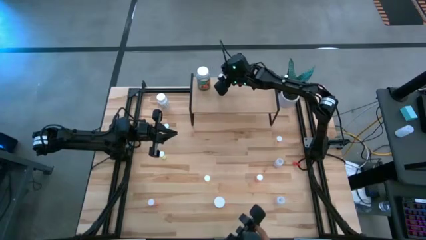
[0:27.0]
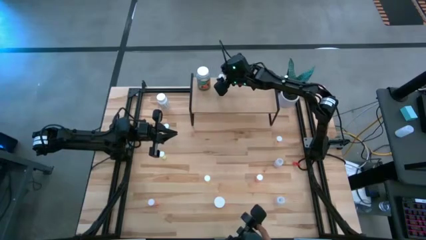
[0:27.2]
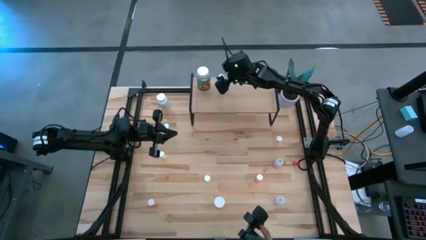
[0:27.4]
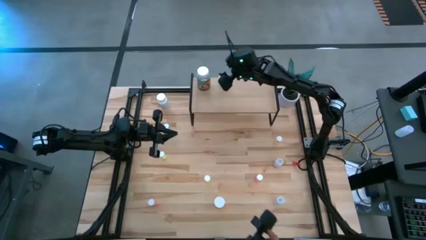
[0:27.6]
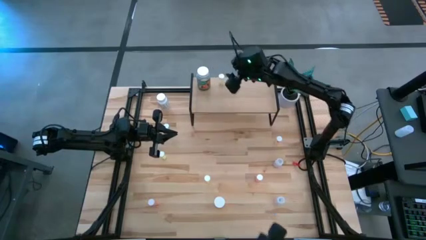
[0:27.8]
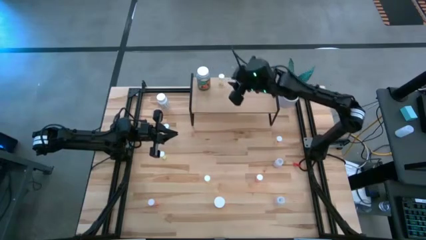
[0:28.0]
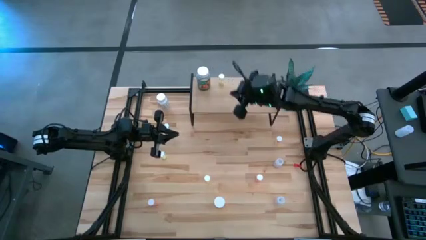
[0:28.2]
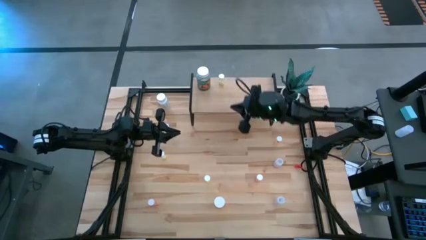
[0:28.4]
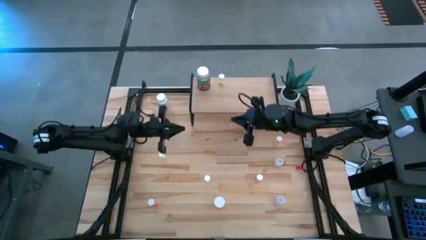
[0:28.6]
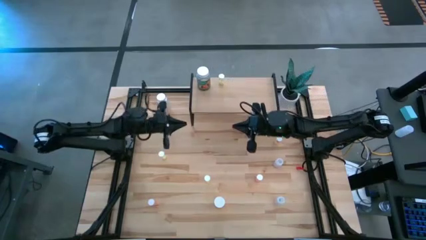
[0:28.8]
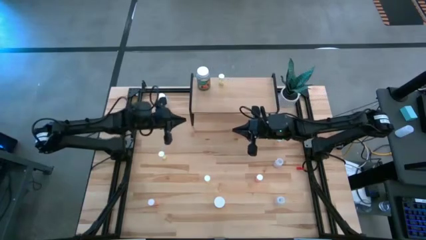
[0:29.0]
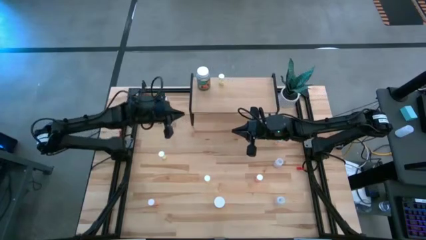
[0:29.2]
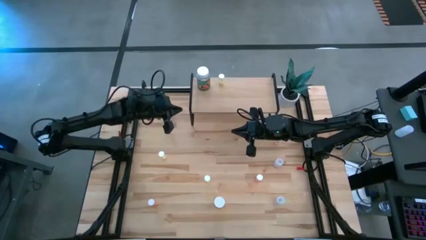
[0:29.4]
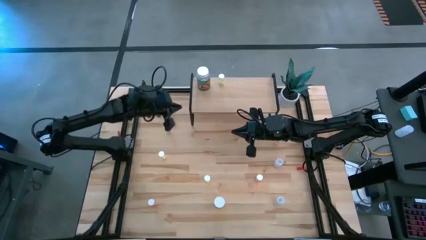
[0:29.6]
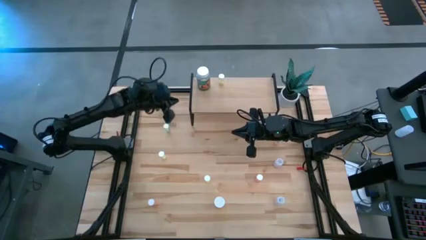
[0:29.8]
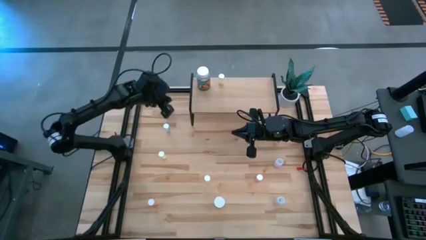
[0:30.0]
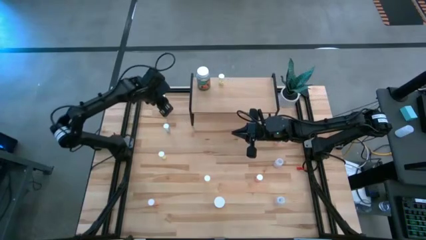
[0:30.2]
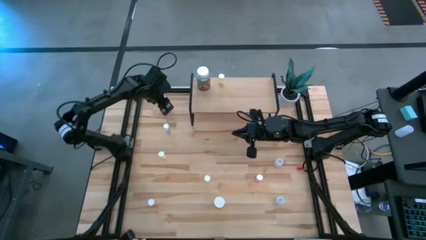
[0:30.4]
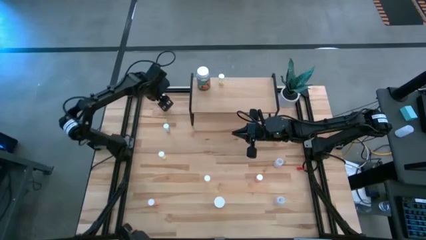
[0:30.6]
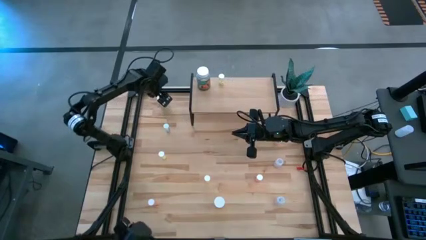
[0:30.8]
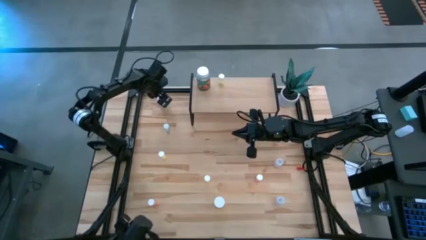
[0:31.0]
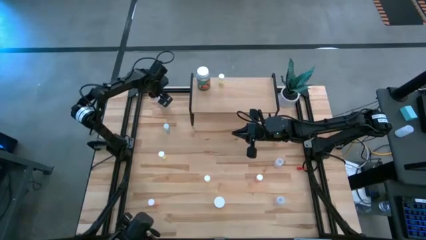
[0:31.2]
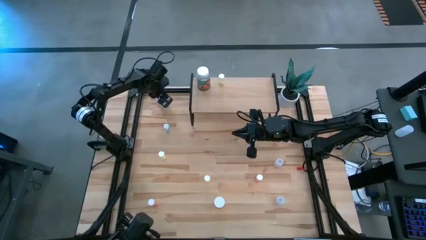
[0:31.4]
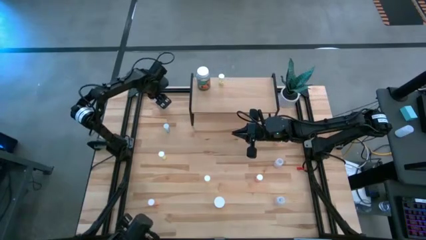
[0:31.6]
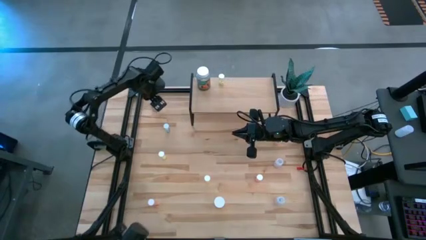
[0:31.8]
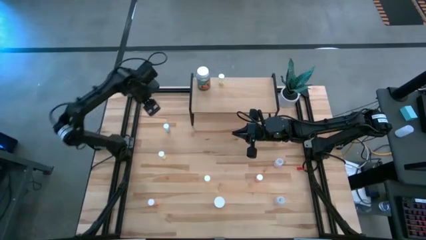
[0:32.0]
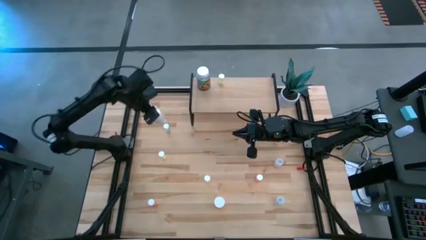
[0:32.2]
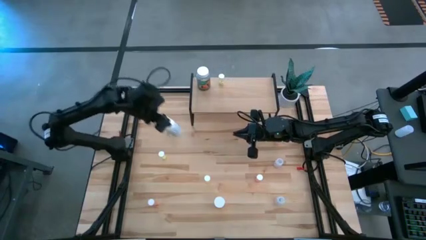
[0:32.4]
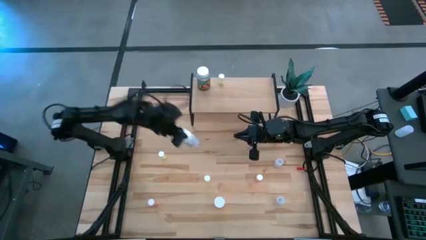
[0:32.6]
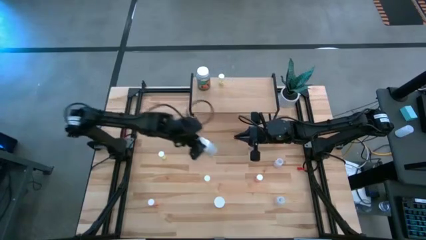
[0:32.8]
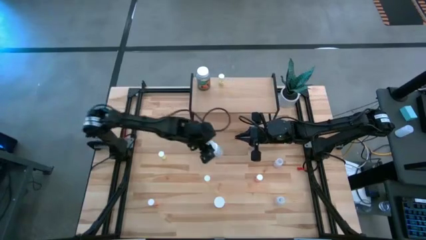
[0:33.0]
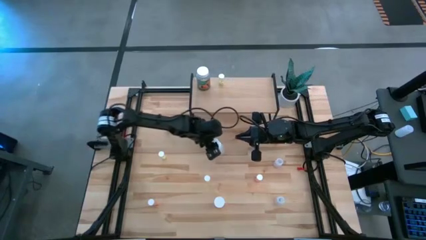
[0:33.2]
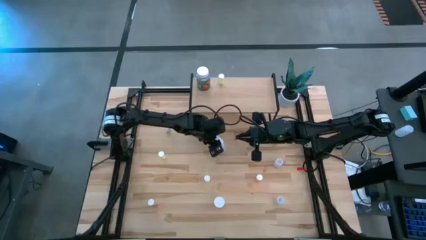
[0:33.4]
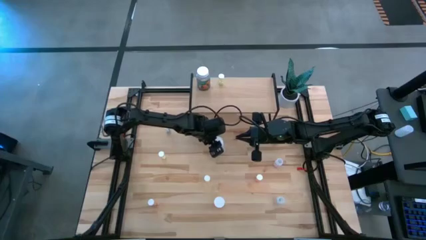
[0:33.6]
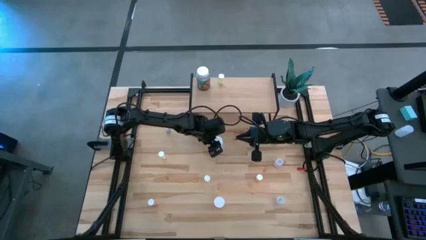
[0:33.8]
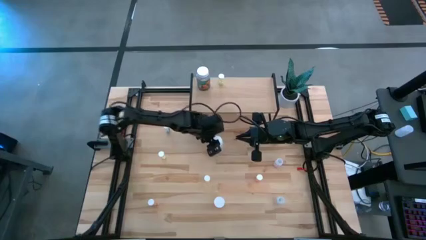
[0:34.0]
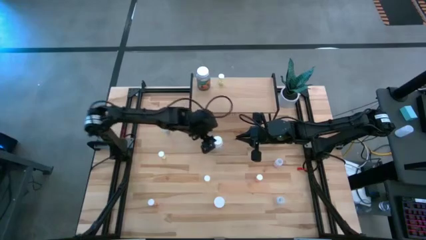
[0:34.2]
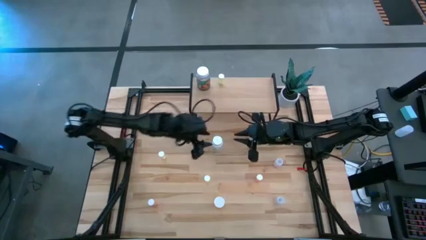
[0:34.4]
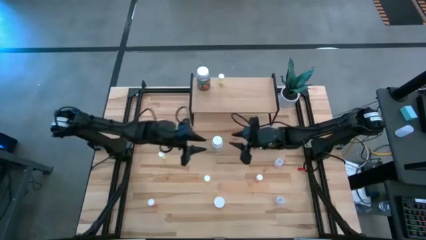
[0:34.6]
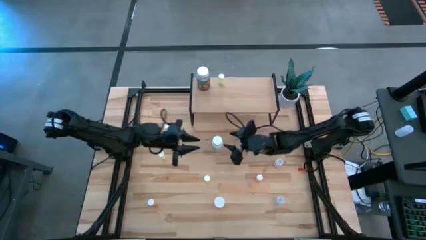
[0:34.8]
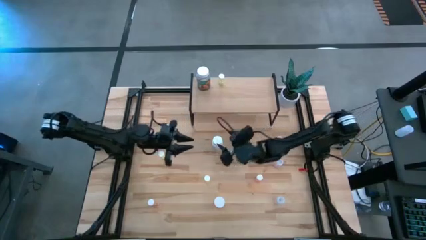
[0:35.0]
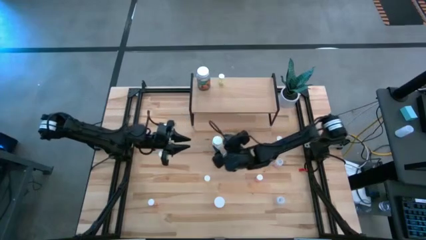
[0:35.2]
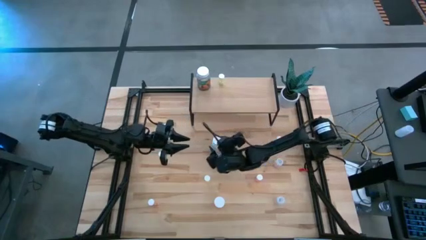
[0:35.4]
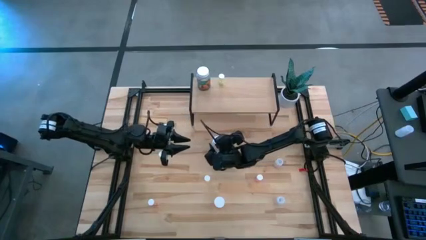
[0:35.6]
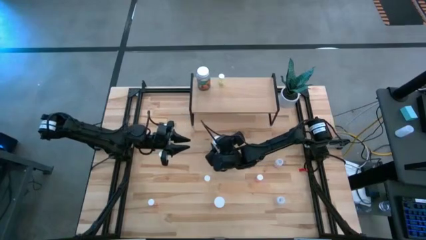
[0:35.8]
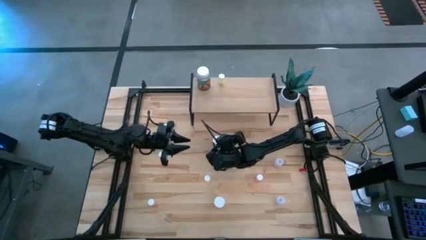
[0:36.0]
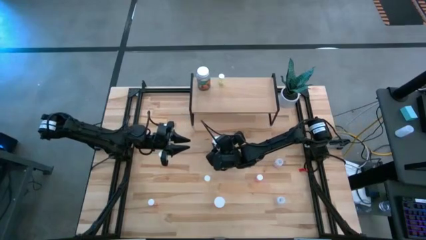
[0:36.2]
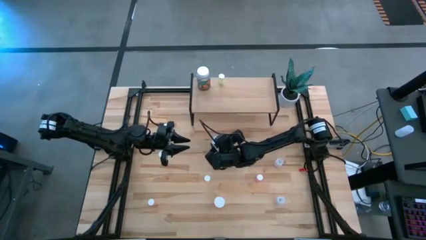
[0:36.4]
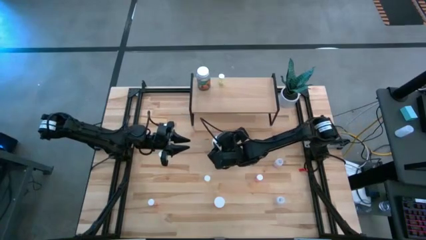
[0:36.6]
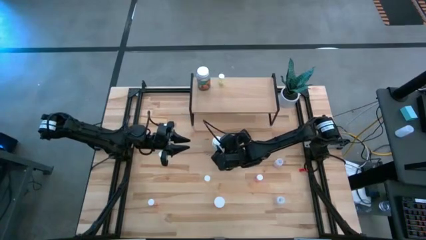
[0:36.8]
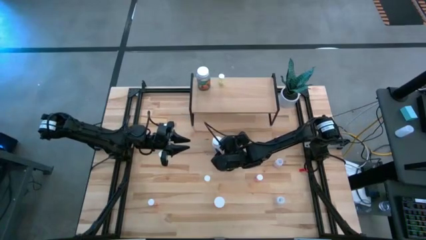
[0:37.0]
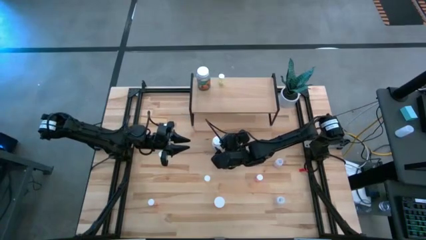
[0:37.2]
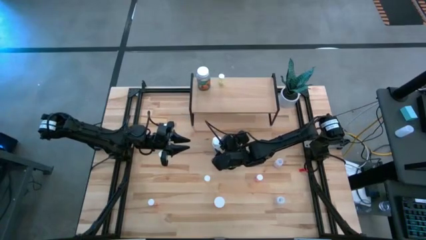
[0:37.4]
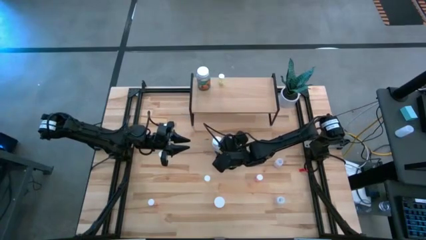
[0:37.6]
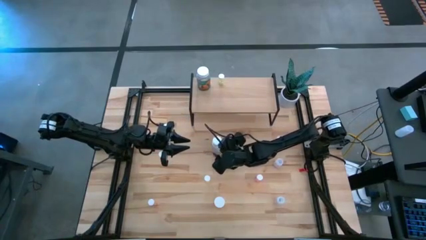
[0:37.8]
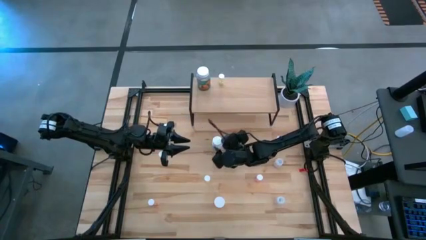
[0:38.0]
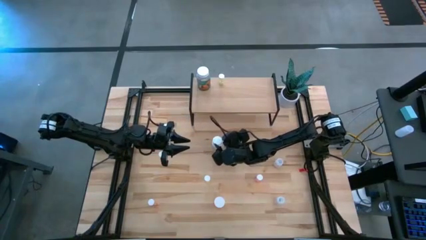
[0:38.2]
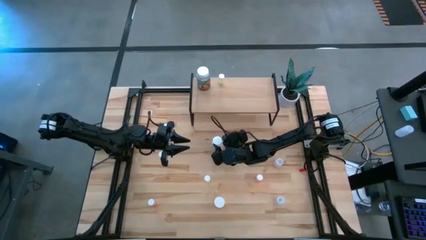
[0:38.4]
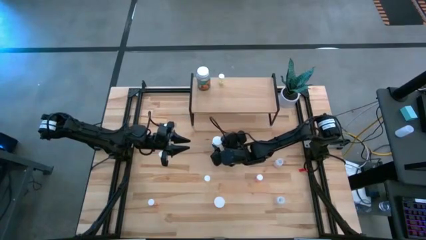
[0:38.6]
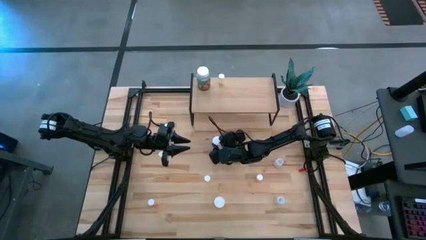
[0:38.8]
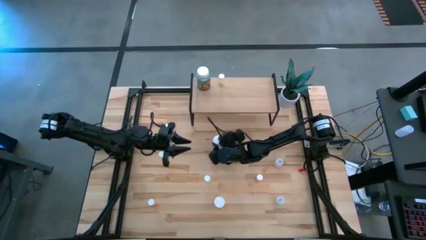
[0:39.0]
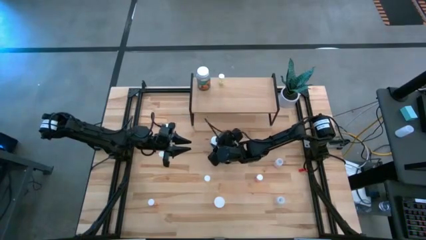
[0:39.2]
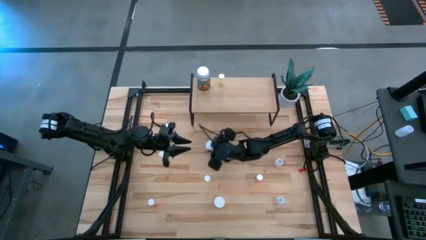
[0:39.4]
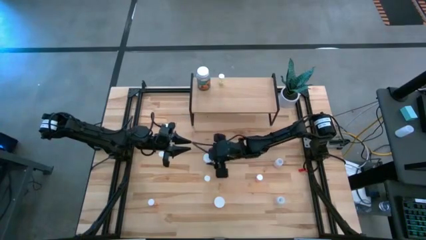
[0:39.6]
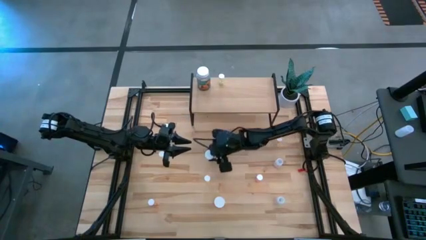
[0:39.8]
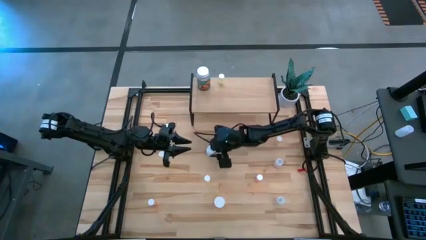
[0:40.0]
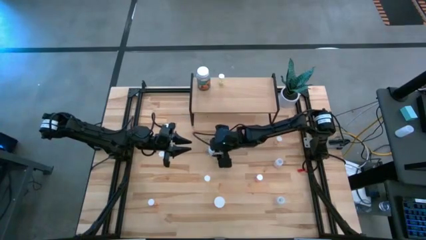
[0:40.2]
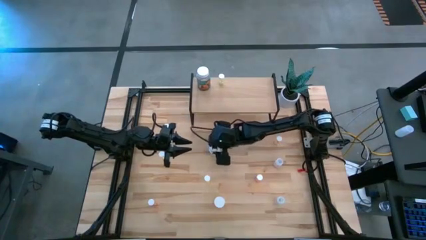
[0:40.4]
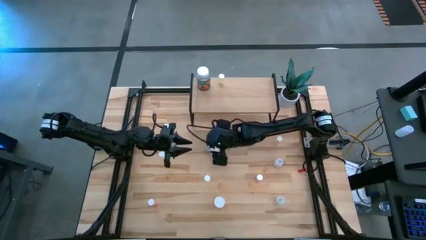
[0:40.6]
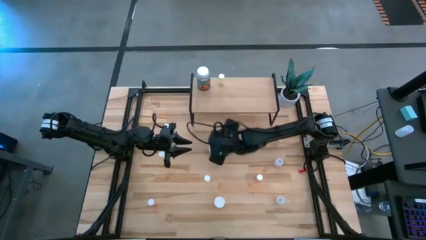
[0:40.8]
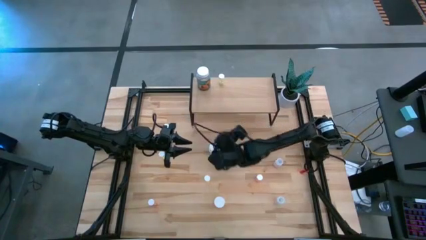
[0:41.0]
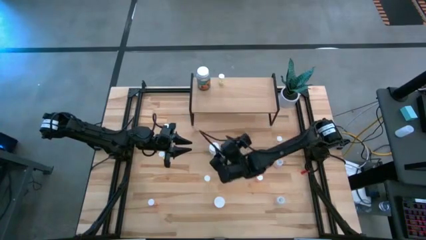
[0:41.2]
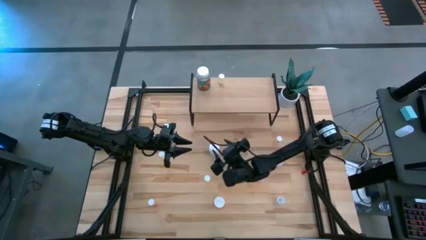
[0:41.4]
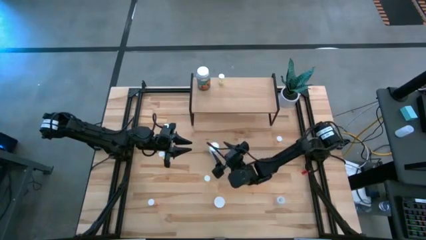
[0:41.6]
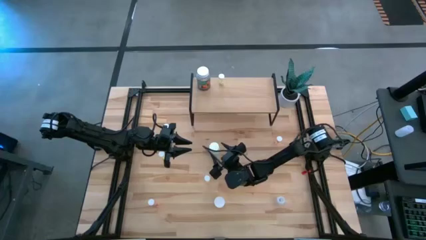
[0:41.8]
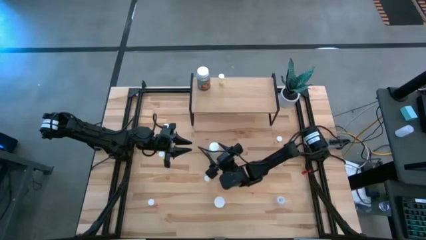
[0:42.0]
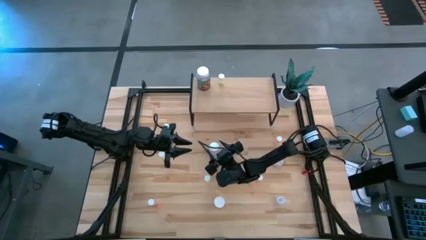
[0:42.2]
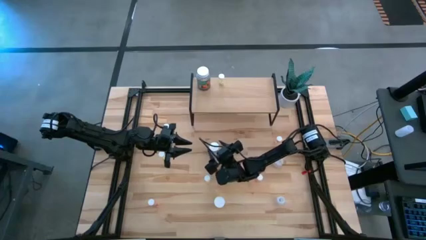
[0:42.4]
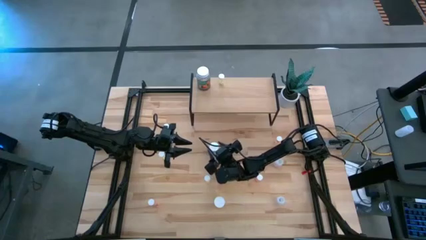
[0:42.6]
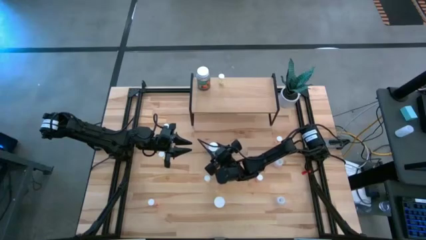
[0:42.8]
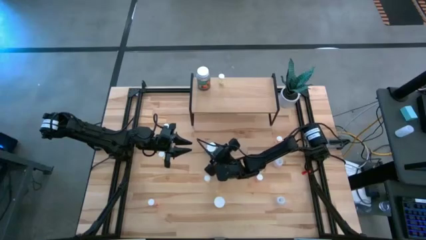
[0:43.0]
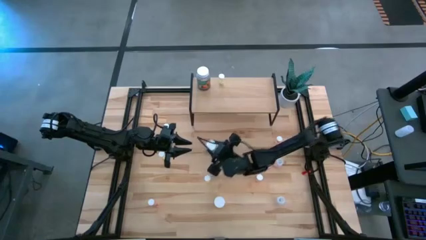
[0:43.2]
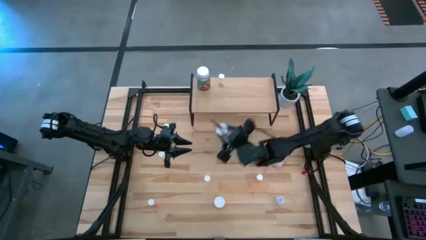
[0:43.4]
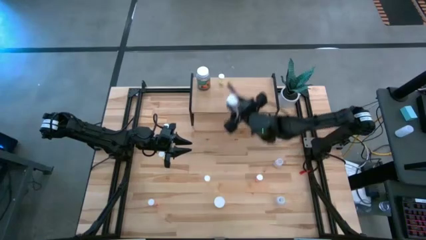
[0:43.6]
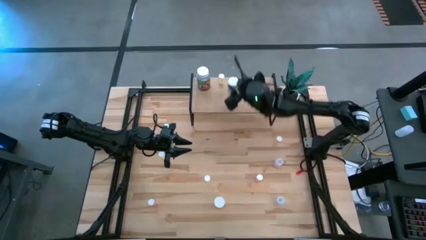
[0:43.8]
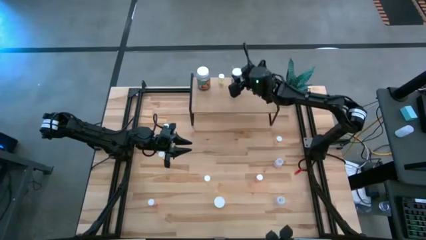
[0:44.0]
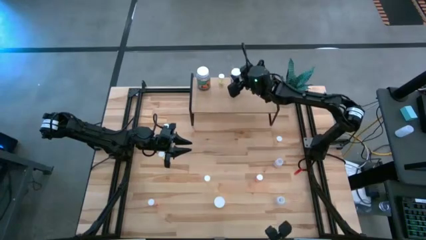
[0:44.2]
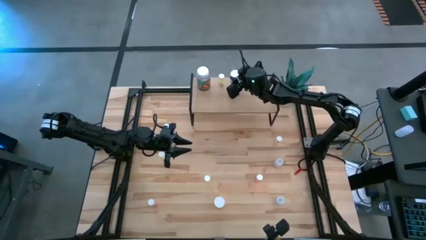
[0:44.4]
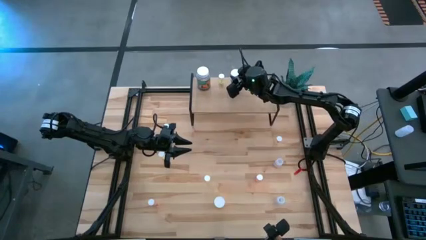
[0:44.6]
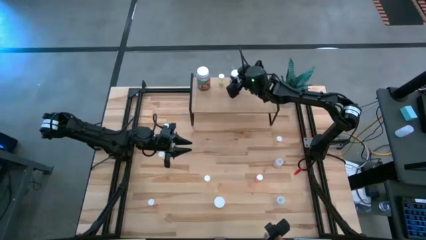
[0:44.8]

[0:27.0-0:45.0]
Task: Pick and place medicine bottles onto shelf by color
Put the white pill bottle on the shelf
